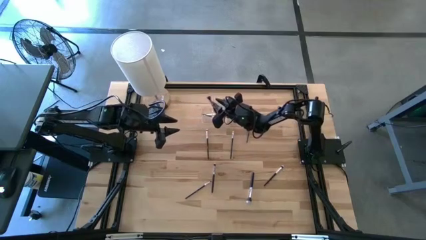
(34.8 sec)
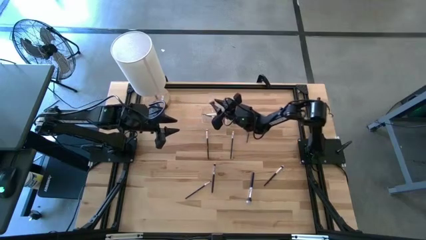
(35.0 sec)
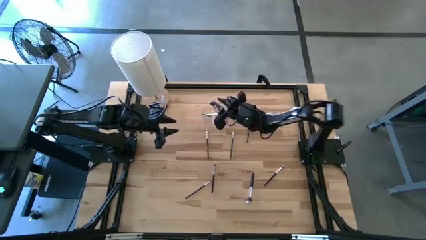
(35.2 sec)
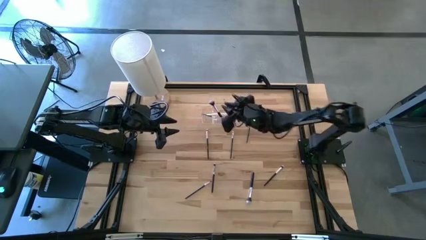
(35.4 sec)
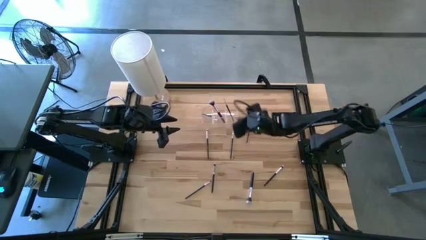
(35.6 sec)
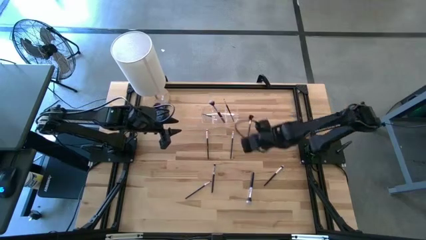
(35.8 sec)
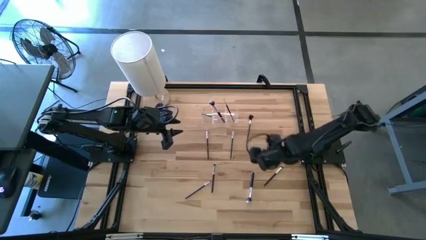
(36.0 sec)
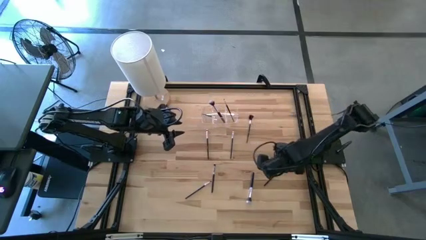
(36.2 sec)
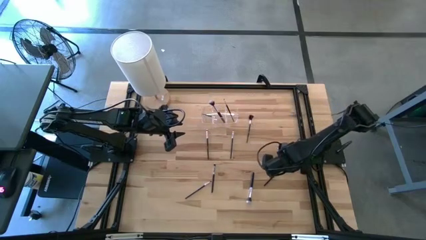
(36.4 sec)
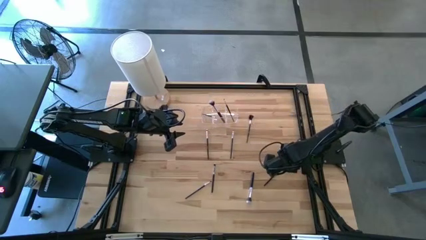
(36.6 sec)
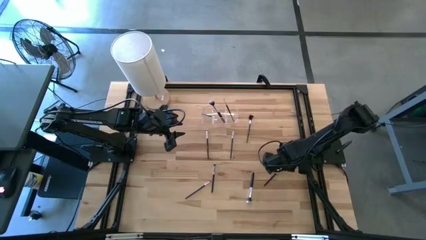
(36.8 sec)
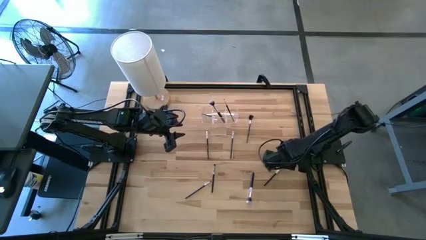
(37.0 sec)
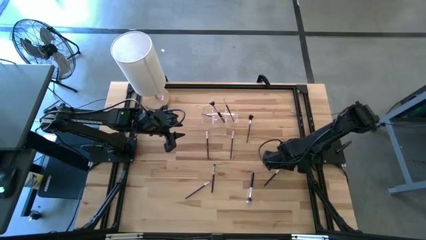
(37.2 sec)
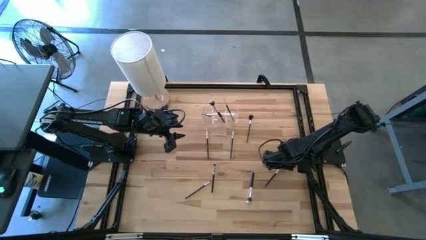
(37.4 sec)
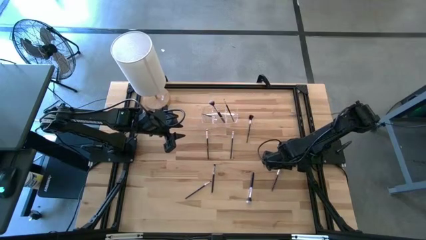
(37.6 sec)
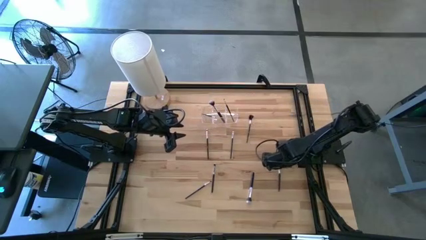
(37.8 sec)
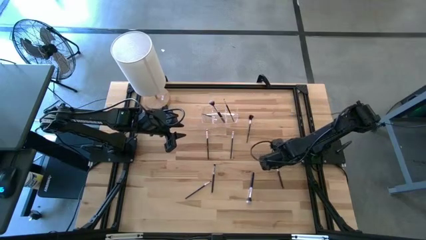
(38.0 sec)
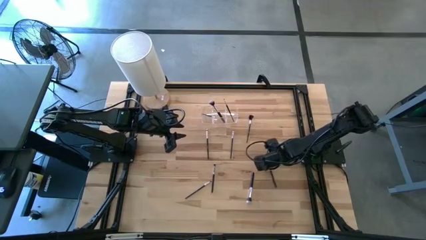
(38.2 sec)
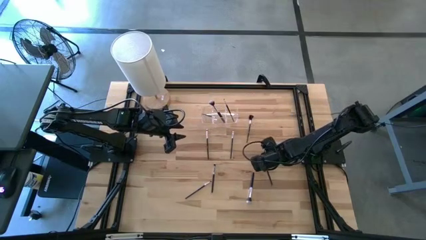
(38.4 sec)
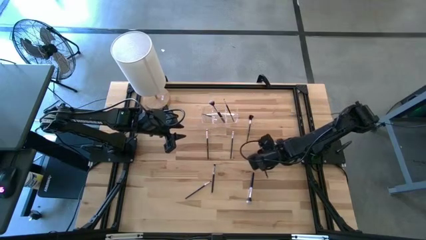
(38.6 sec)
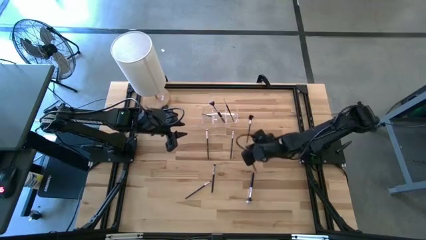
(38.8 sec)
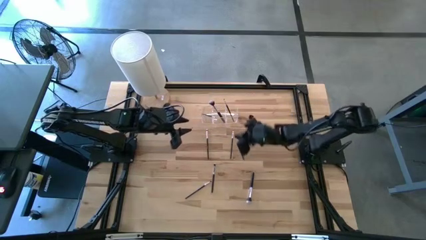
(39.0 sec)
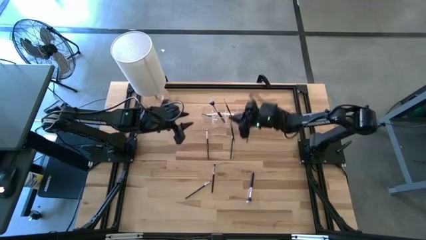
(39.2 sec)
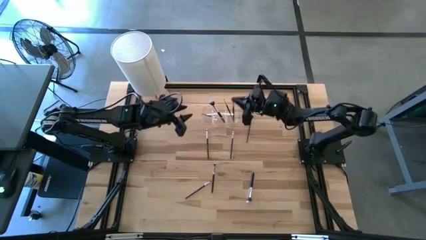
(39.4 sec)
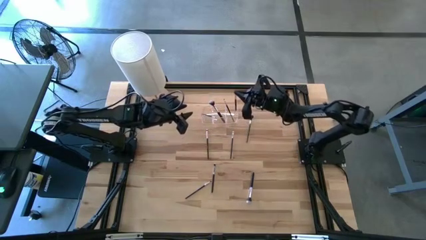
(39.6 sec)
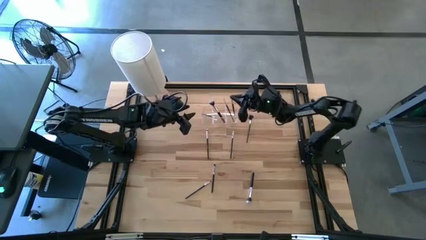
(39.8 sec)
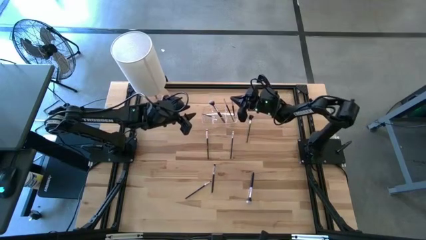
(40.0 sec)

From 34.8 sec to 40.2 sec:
Task: Put items in baskets/containers
Put the black eyeshadow brush into the transparent organizer

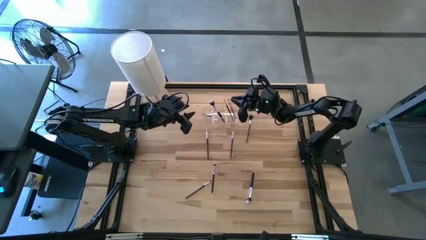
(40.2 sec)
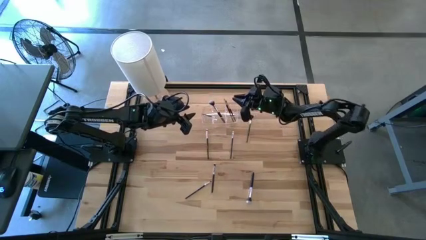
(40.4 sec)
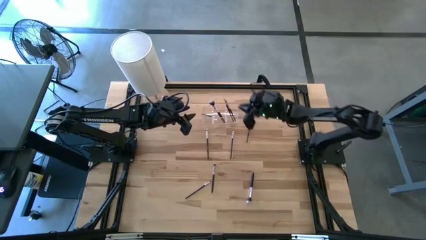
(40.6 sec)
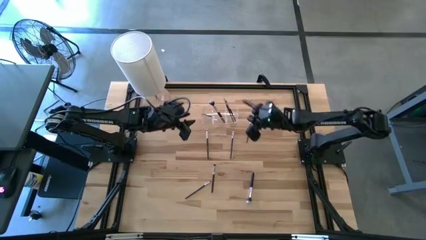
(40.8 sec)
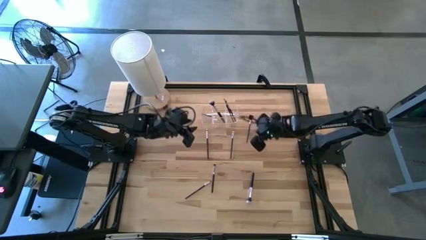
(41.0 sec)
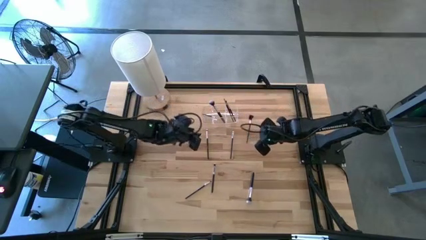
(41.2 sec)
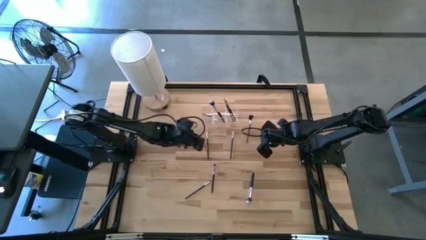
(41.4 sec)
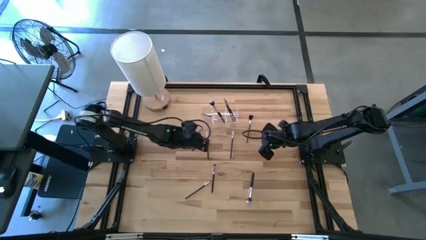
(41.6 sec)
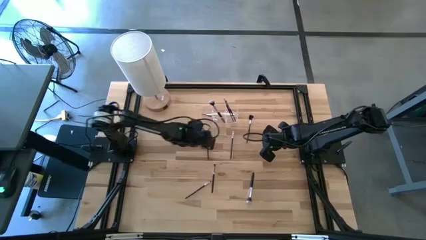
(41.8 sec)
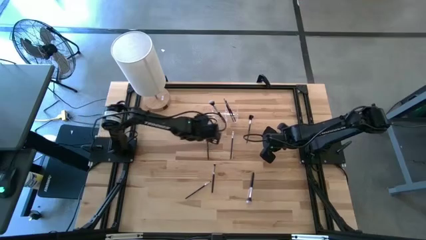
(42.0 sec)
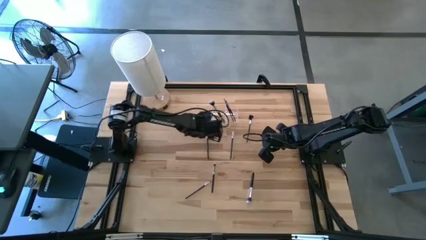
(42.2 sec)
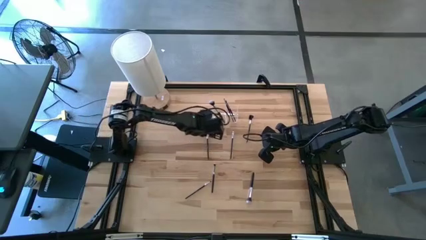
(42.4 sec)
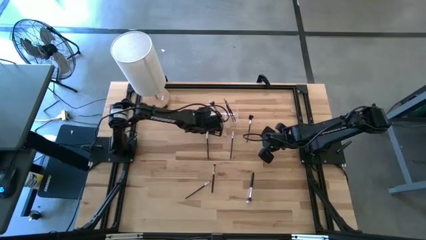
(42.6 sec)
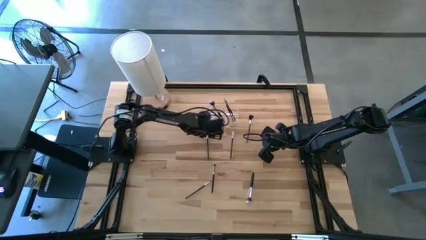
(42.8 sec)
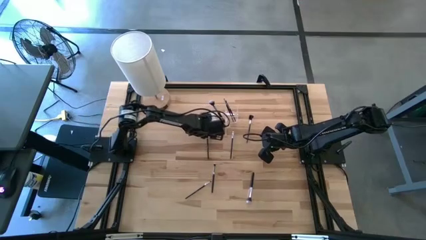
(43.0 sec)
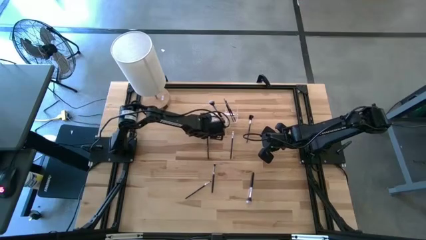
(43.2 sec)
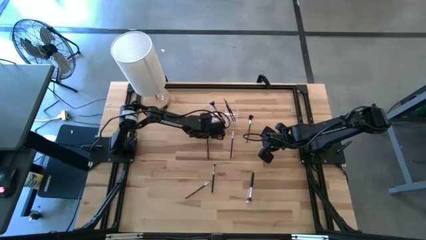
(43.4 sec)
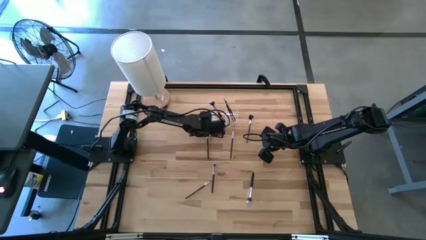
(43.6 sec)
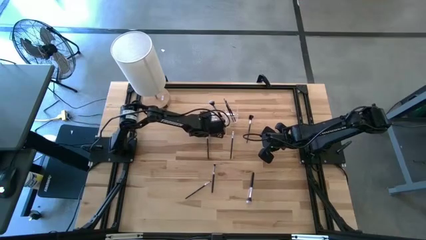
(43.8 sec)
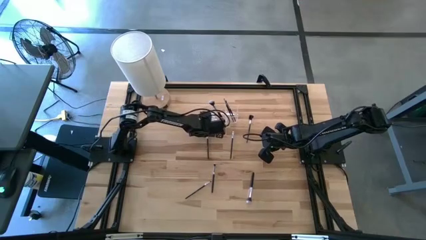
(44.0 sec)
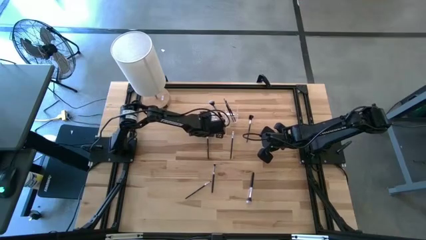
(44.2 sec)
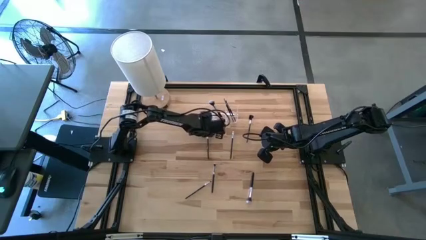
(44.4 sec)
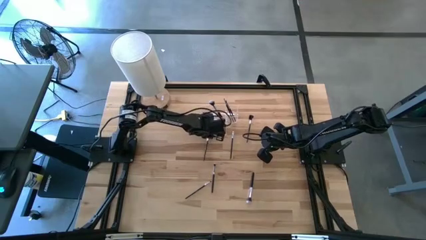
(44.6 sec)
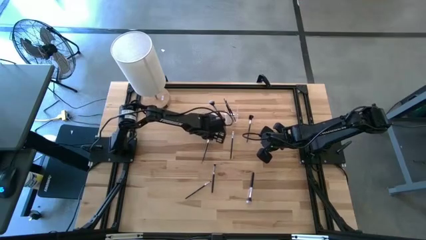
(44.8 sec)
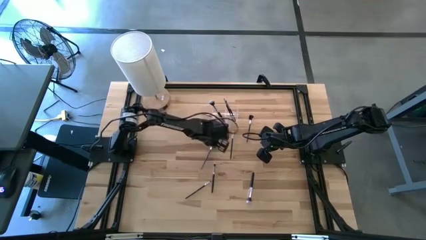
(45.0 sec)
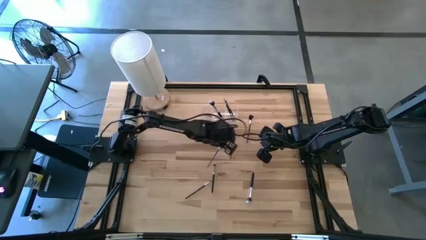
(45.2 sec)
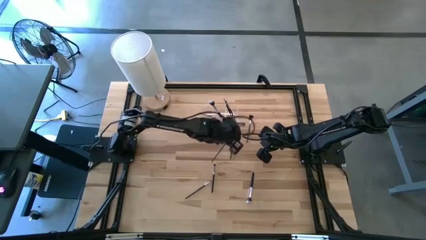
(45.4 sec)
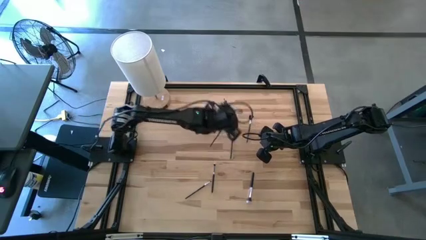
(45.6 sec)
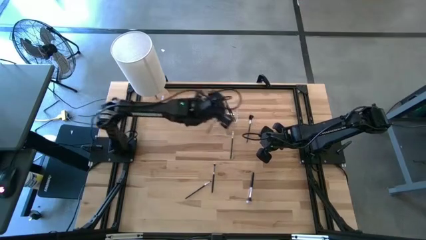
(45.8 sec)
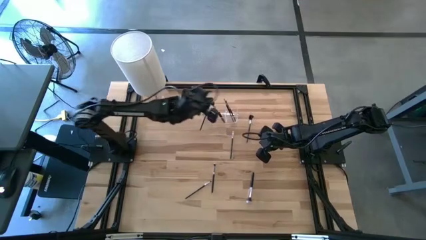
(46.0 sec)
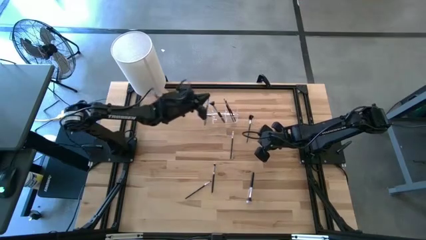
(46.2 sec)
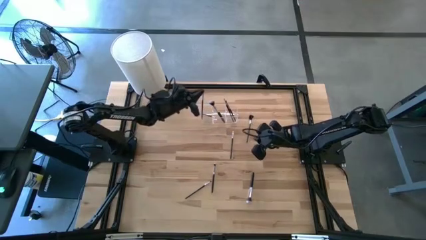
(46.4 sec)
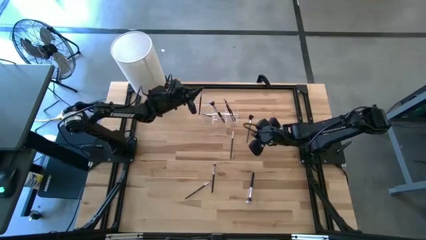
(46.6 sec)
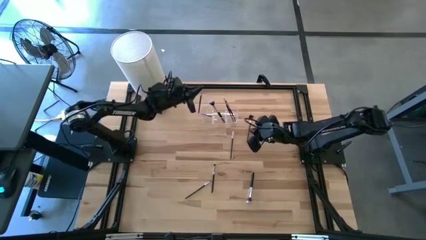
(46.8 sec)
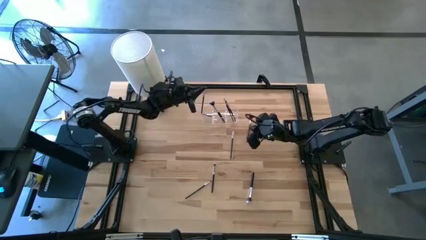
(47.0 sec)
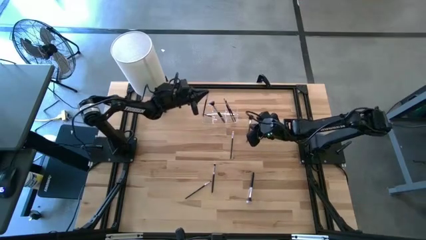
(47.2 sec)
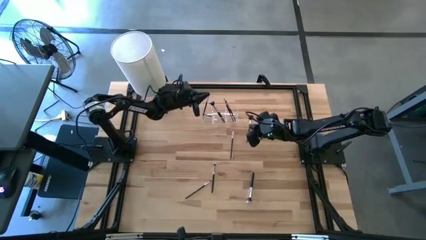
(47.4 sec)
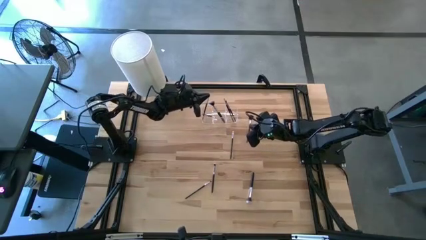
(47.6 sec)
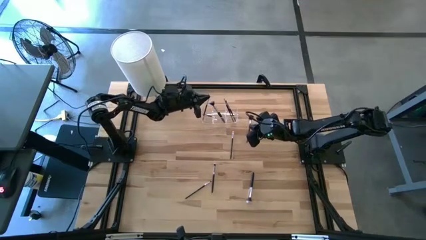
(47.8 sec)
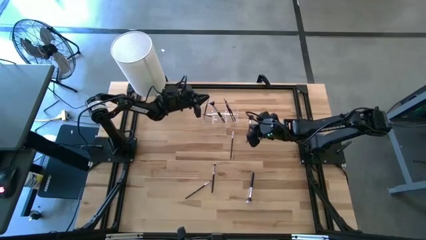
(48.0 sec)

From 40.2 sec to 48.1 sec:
Put the black eyeshadow brush into the transparent organizer

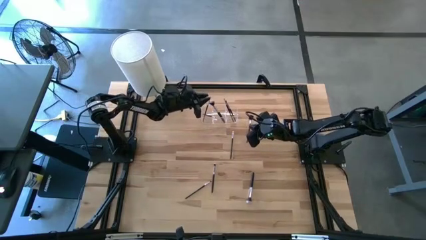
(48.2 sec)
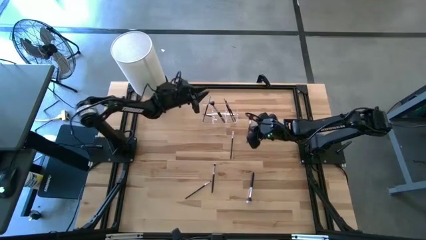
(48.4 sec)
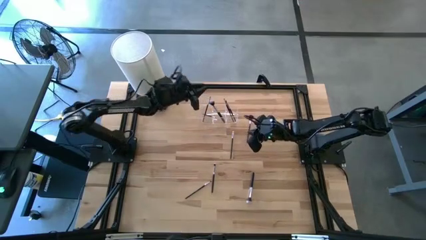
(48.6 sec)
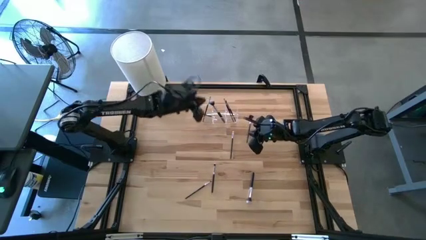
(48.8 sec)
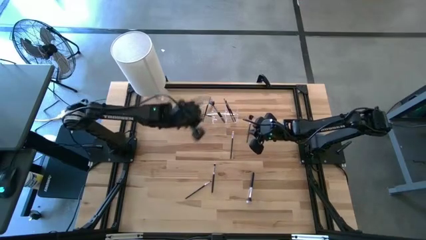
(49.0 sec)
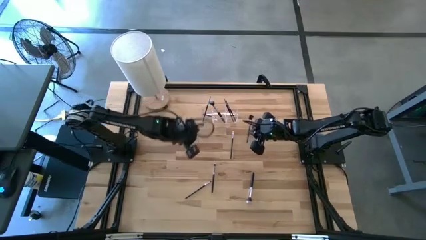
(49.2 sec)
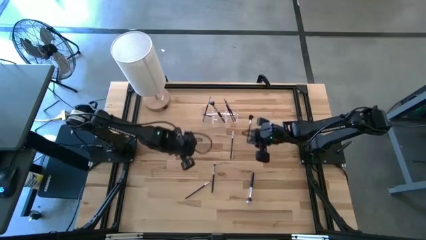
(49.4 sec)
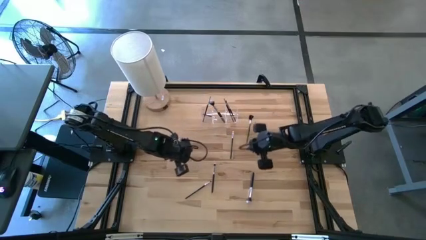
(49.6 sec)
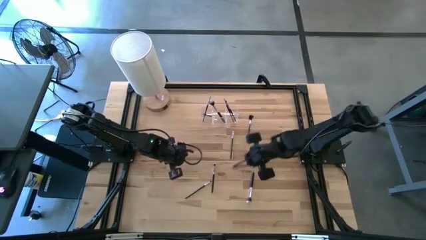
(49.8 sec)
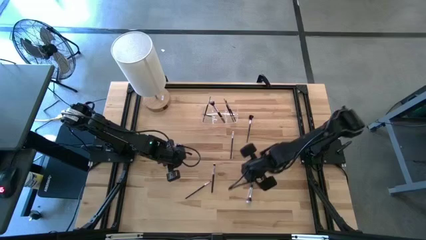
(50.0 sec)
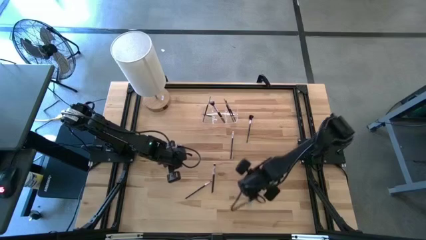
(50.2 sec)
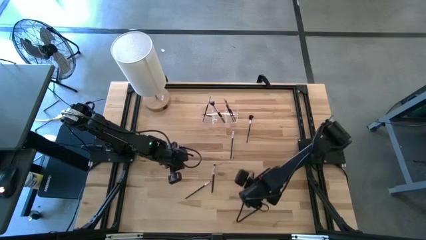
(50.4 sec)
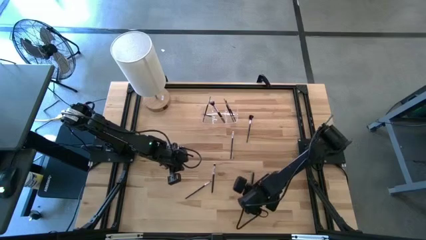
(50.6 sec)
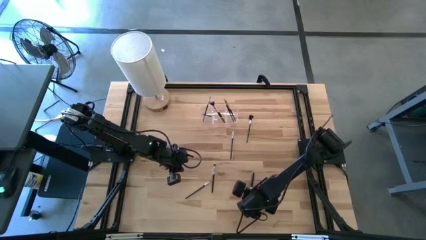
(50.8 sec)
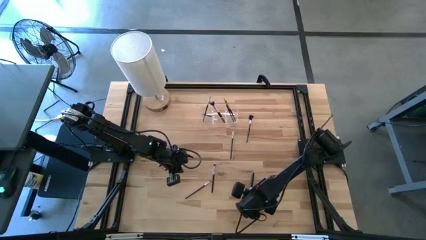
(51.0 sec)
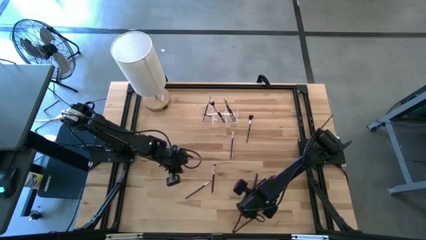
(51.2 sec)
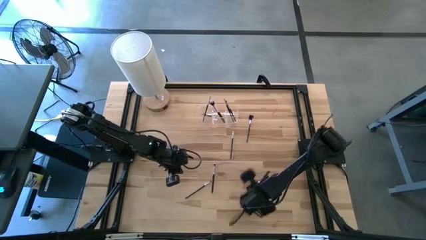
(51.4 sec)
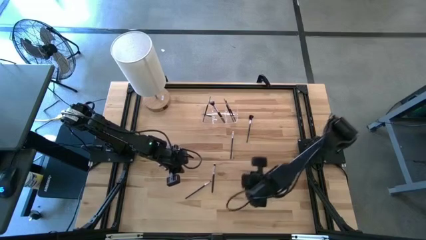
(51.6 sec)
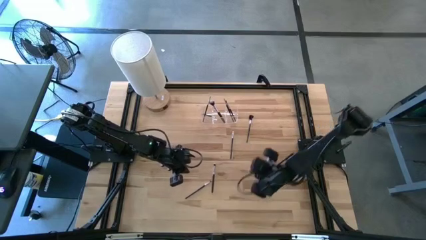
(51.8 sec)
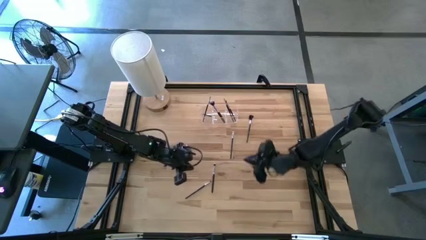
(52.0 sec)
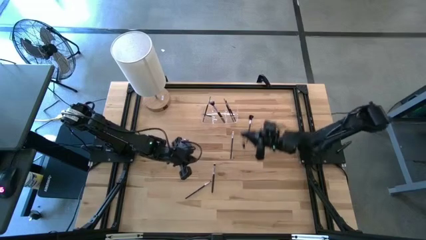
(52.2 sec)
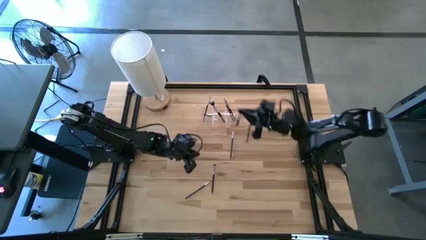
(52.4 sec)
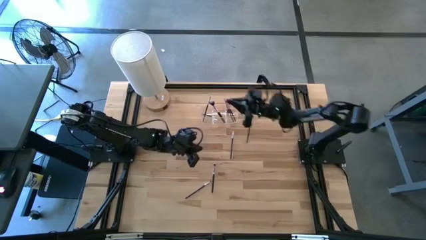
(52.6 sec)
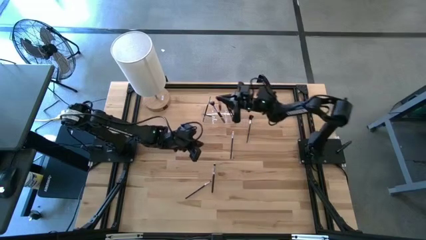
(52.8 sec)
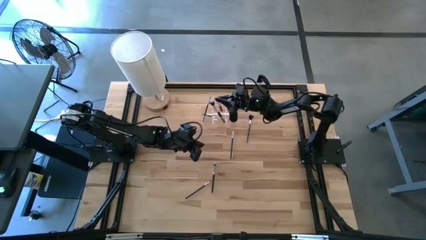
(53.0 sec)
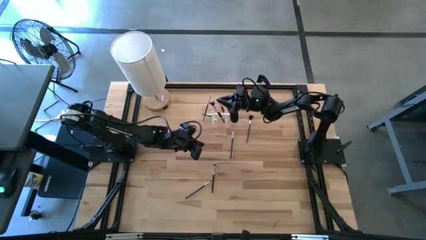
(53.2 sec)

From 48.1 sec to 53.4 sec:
Put the black power brush into the transparent organizer
